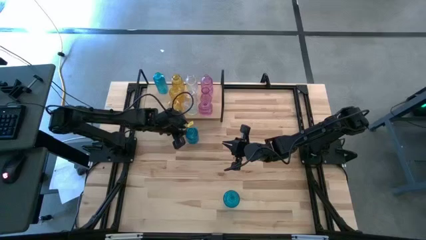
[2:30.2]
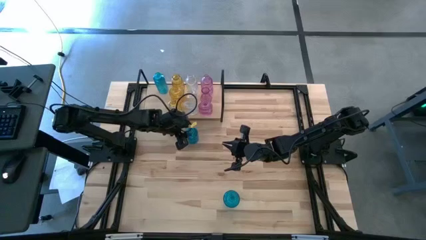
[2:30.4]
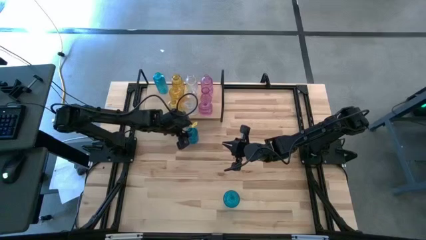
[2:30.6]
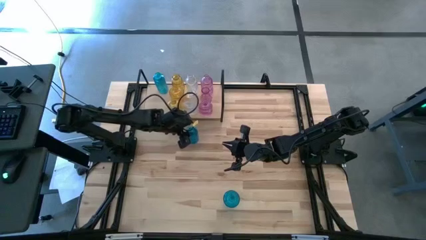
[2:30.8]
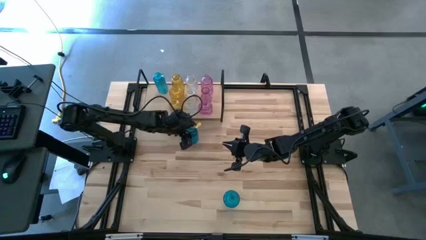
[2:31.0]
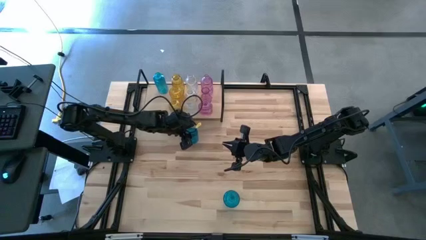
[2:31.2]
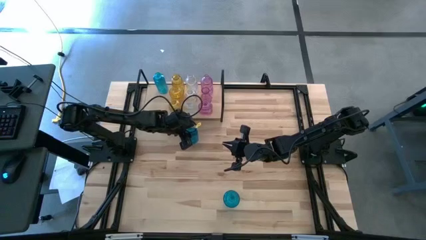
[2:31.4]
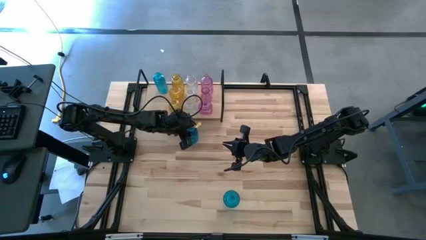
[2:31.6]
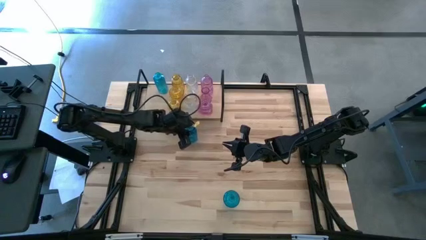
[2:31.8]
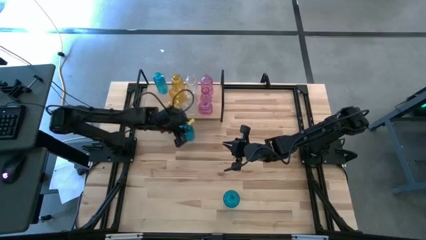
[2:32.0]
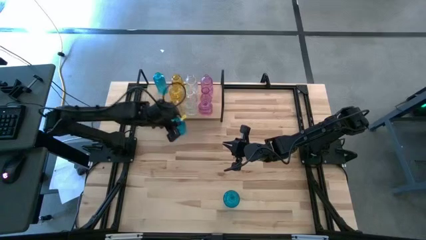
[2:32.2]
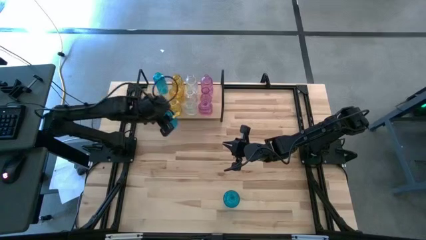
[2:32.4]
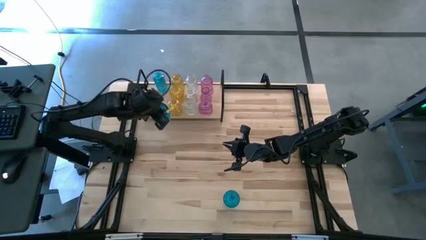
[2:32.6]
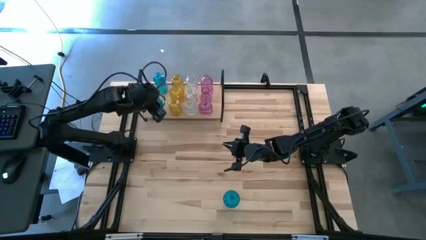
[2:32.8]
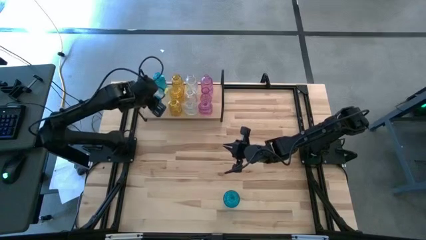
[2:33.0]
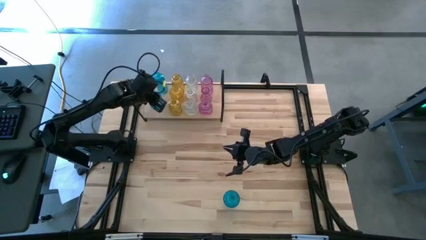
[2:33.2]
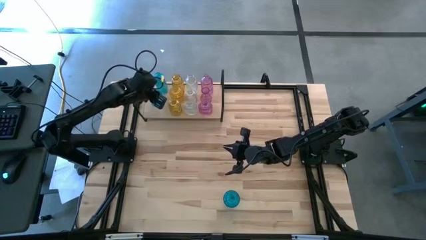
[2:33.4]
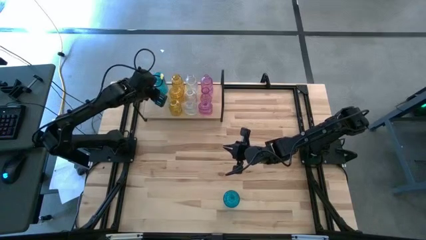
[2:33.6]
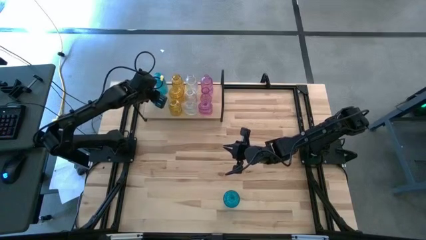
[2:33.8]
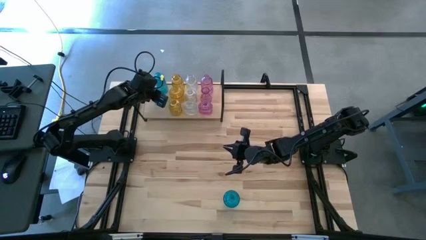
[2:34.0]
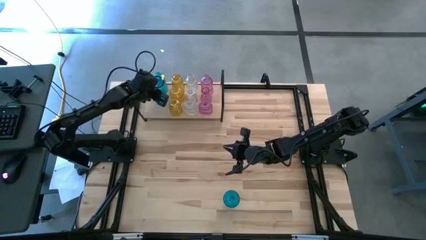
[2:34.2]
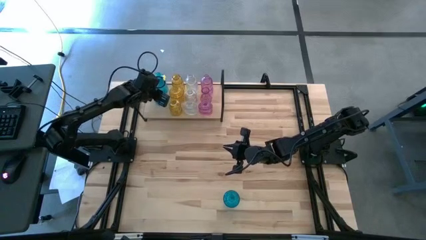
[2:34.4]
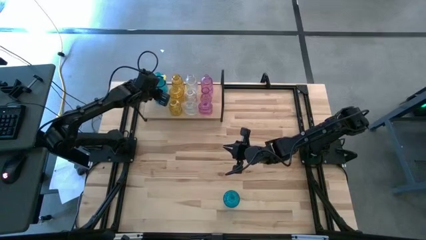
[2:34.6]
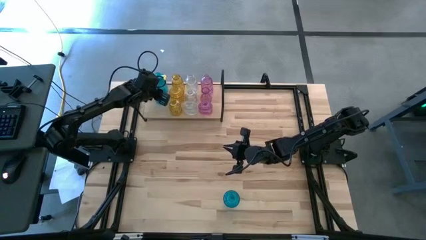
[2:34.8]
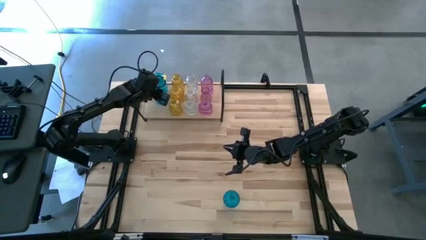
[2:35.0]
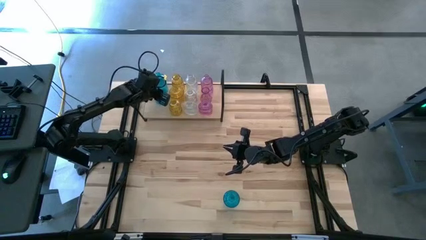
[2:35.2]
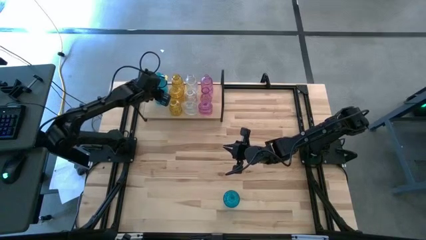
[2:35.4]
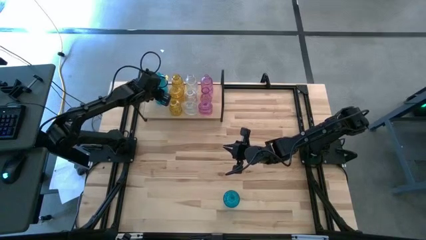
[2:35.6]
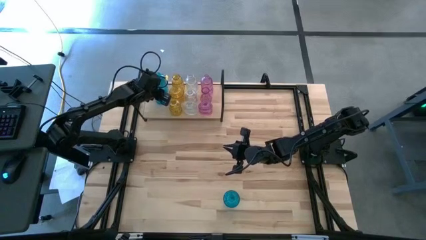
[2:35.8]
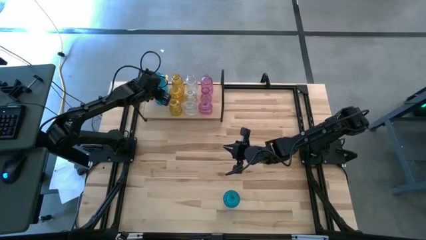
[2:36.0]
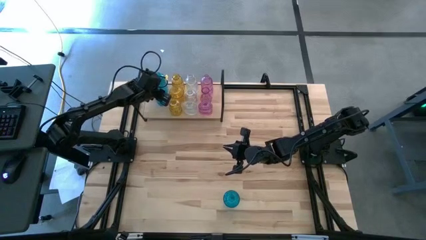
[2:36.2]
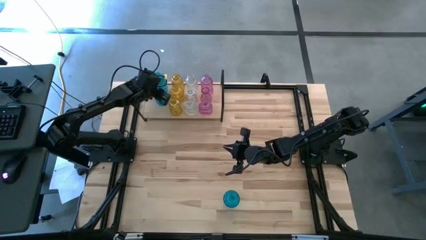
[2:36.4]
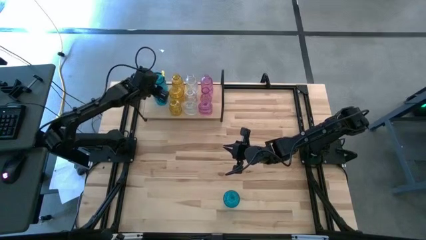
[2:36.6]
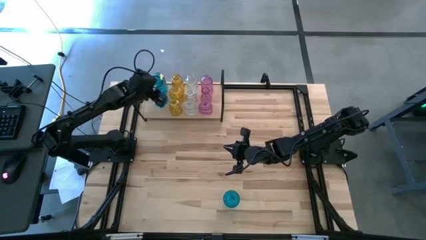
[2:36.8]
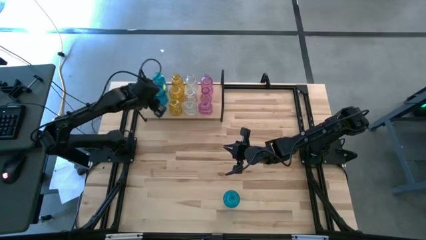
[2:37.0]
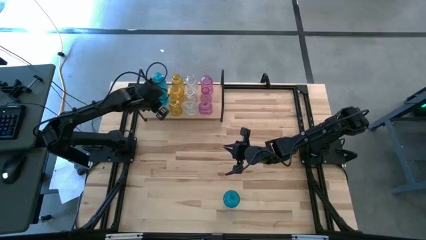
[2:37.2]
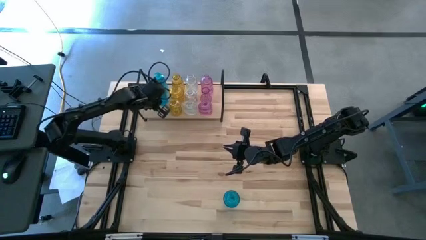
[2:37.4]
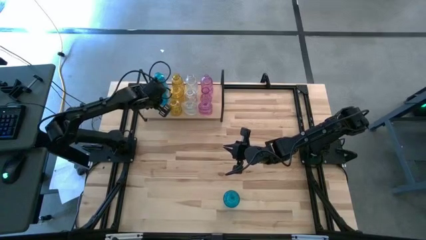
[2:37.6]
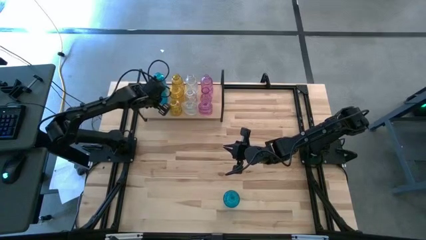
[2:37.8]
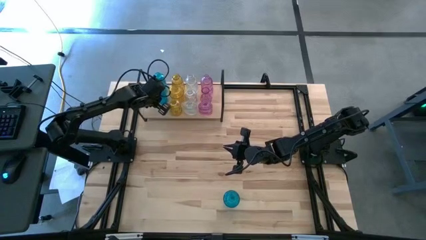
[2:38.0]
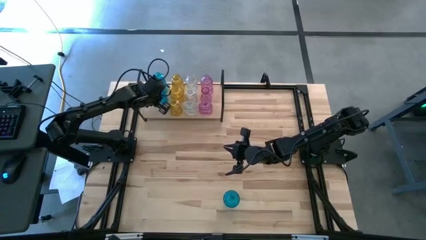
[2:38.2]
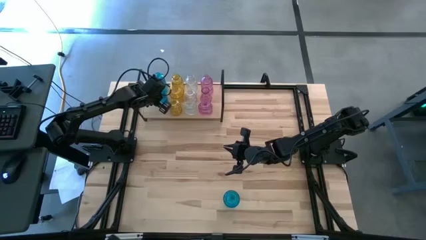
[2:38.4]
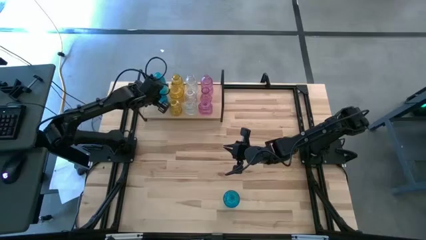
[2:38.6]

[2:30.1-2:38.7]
Task: sort vases onto shelf
Put the right blue vase on the shelf

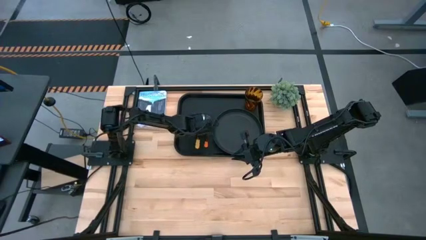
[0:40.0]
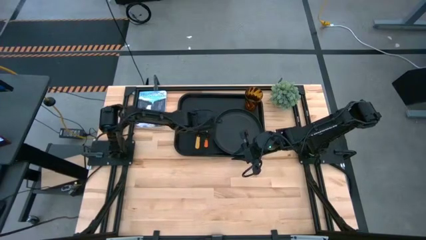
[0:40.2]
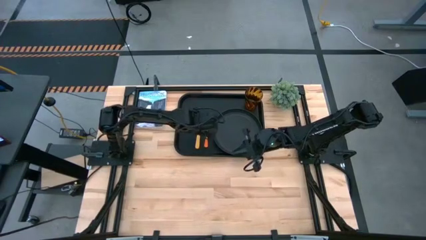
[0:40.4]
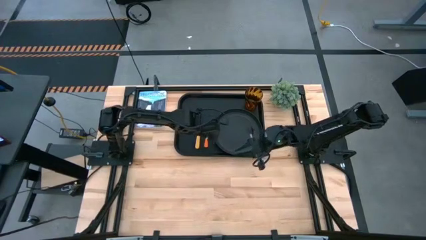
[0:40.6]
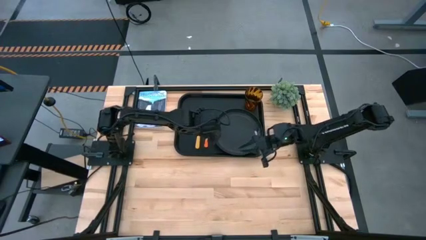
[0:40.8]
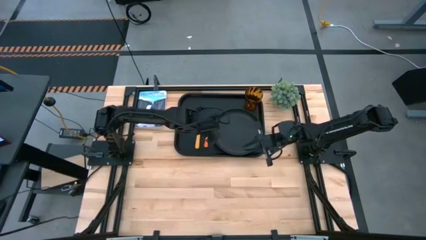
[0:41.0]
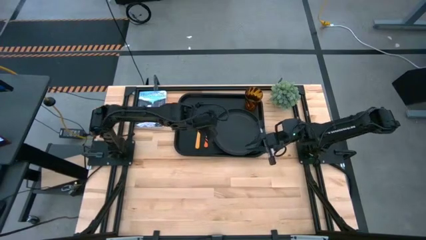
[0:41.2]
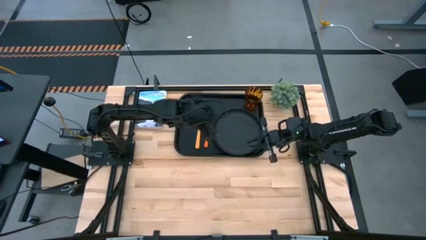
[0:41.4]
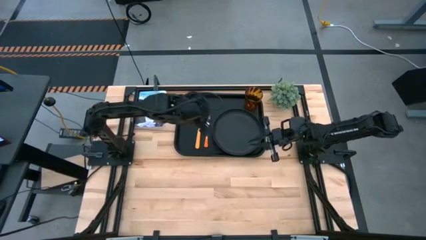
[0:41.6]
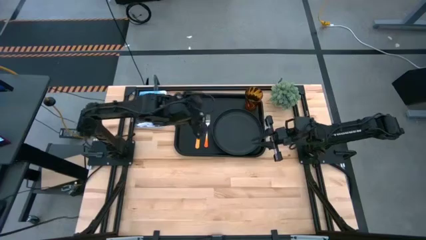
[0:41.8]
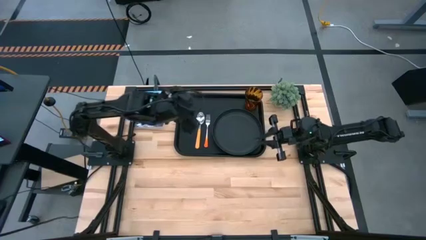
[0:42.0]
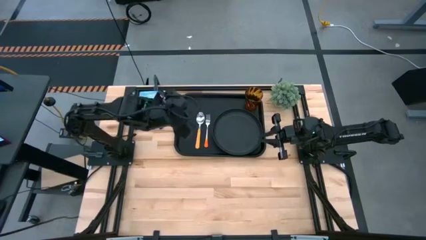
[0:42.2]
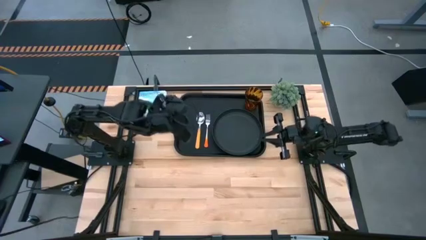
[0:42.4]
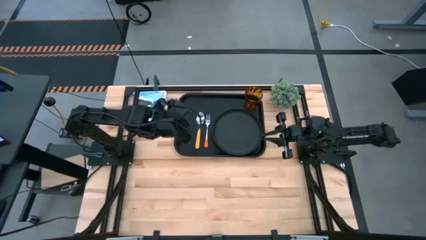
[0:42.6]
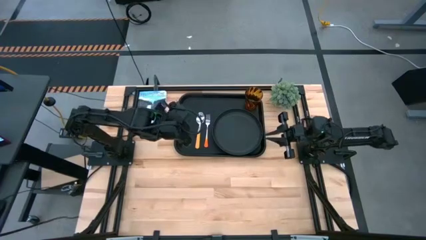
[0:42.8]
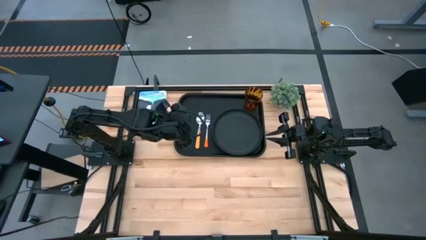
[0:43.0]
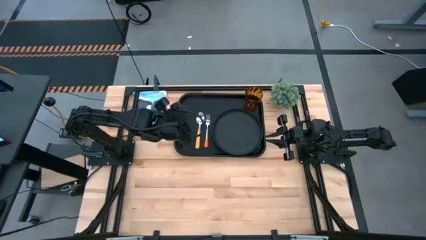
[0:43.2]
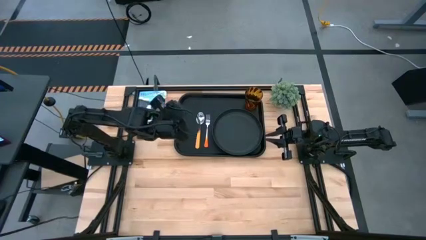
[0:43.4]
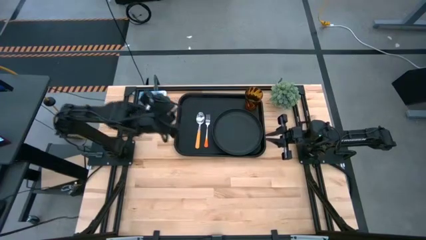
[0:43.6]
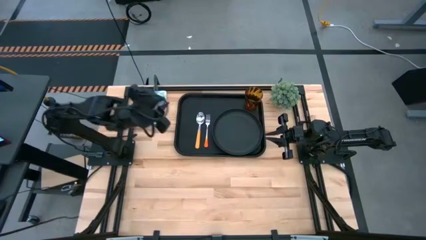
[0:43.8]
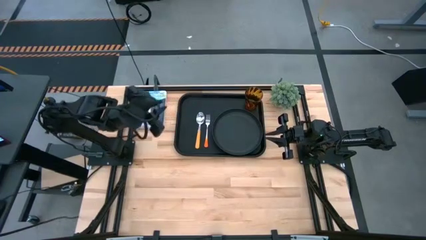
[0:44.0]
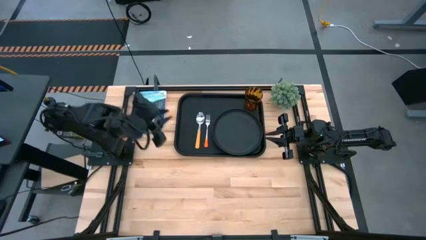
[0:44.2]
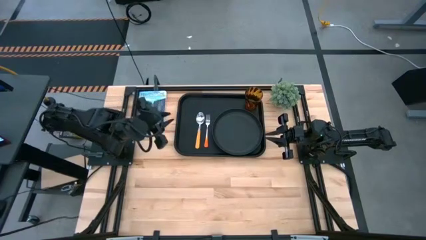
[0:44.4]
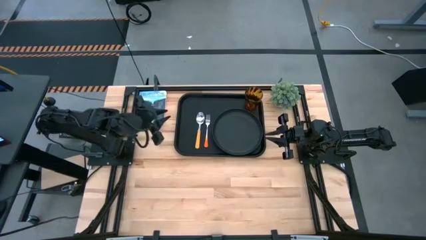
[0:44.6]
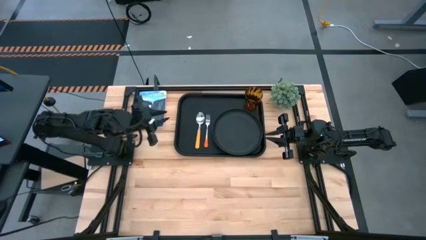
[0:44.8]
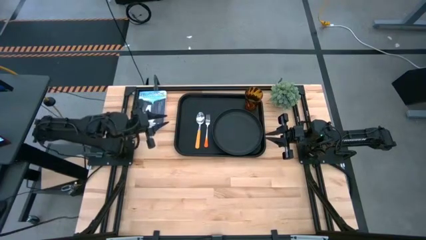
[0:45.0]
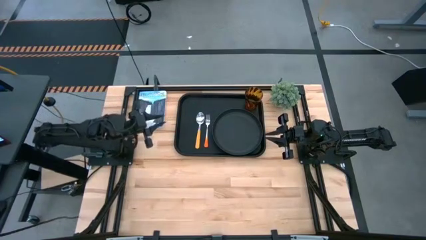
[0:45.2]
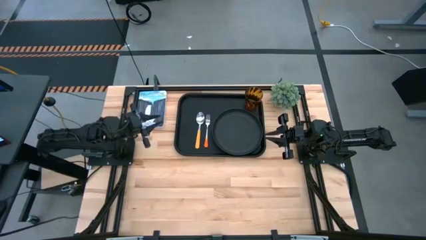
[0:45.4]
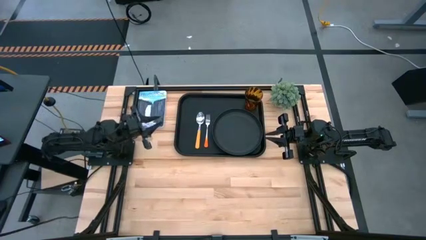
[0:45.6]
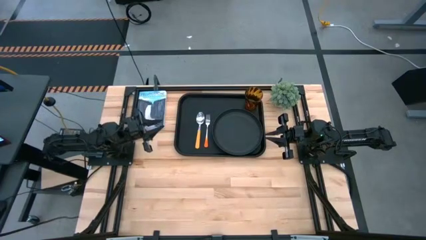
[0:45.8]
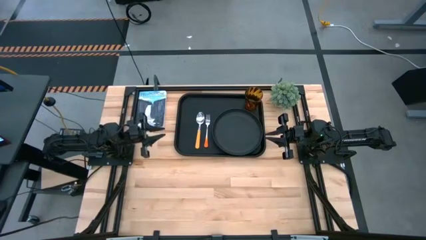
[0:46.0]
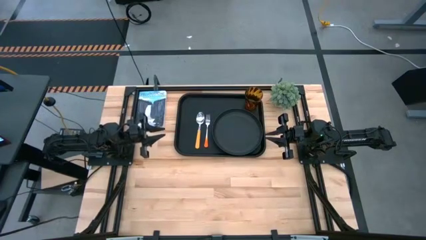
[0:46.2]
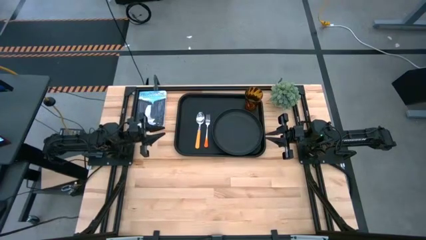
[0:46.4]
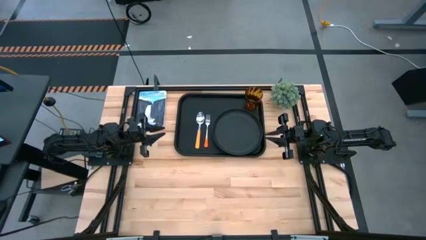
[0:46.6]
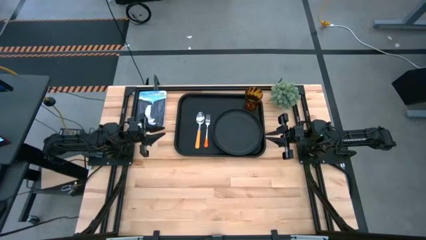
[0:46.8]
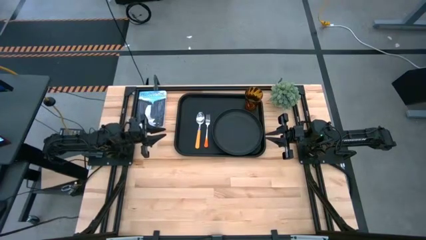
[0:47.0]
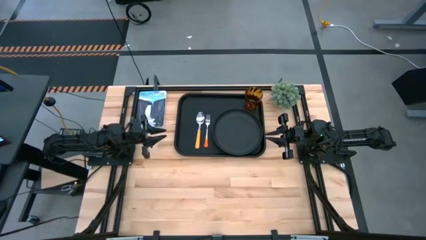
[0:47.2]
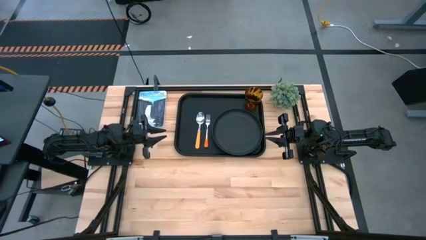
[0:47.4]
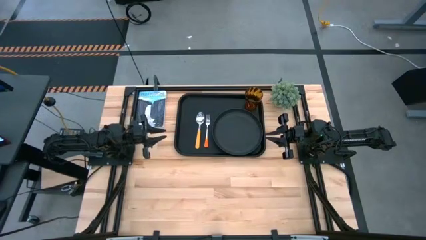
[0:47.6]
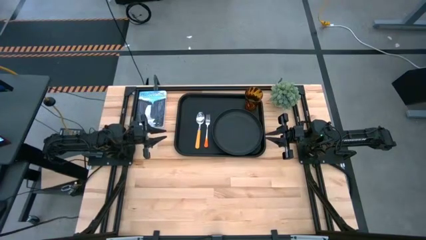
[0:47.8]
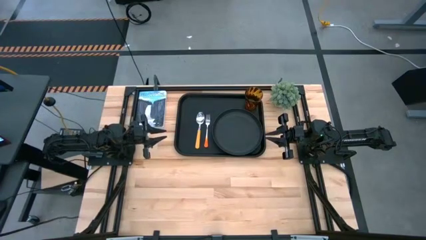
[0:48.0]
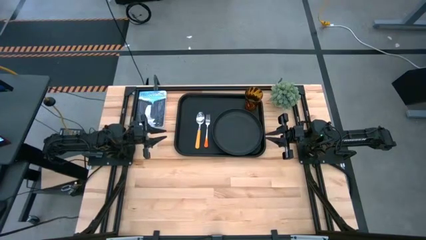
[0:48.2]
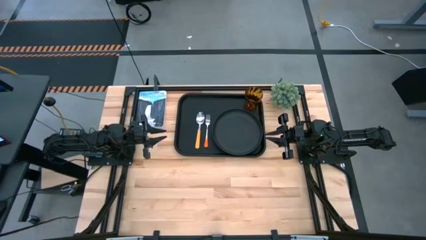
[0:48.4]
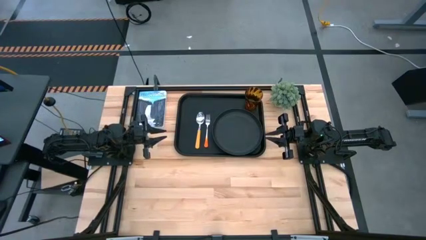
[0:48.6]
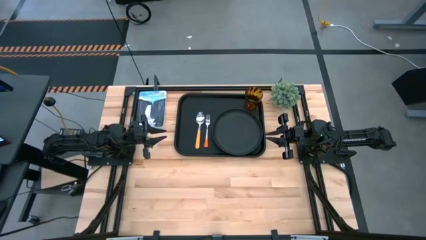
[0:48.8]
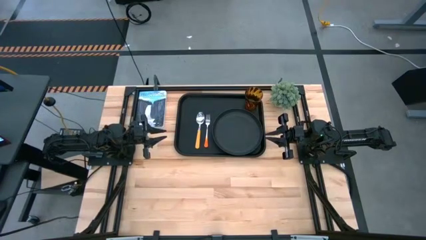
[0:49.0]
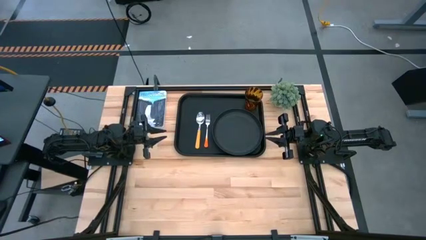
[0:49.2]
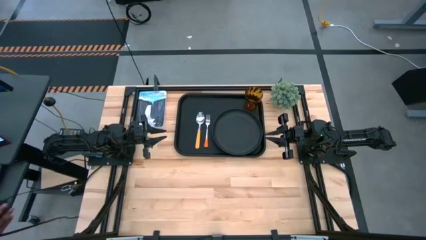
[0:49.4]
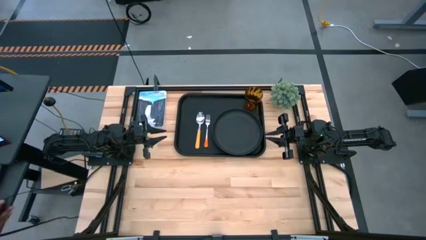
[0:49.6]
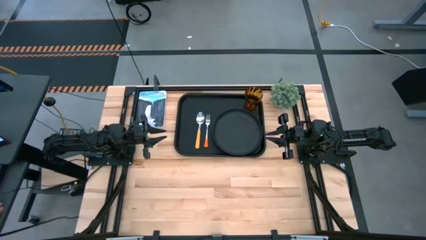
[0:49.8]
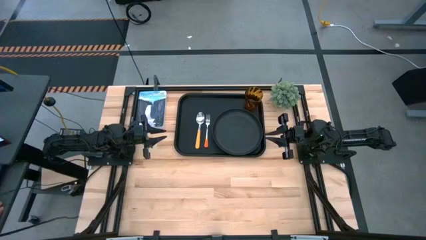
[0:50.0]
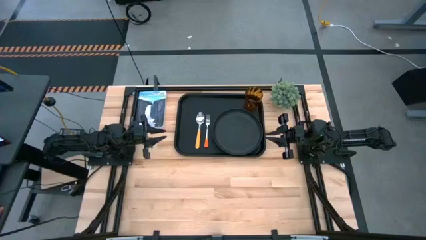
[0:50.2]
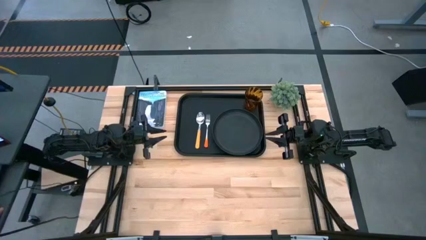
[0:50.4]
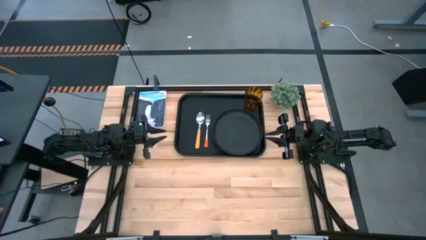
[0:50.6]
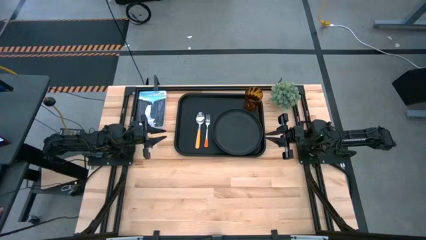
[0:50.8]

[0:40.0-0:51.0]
Task: Pick and place plate/cup/fork/spoon on tray
Return to Home Position
